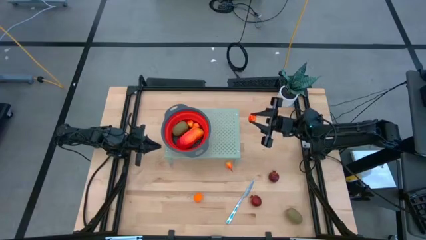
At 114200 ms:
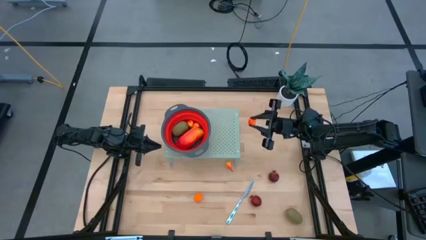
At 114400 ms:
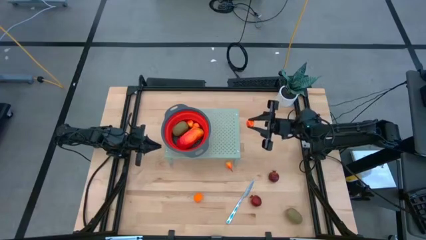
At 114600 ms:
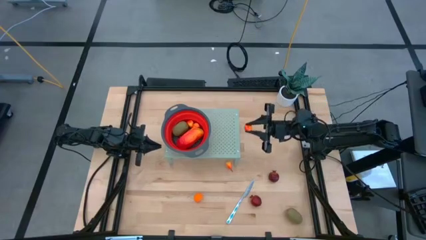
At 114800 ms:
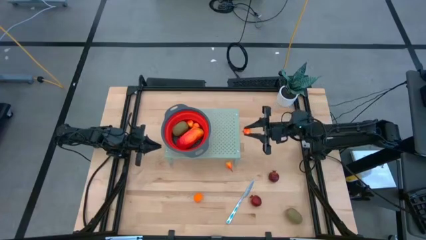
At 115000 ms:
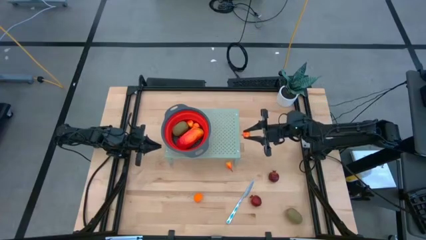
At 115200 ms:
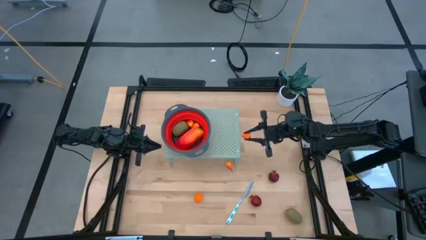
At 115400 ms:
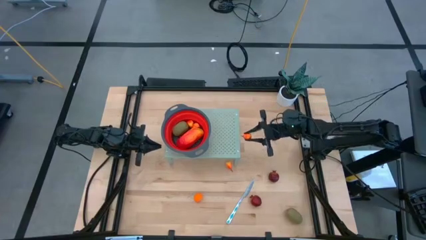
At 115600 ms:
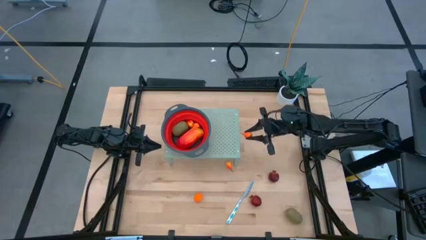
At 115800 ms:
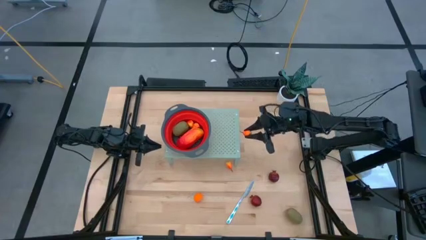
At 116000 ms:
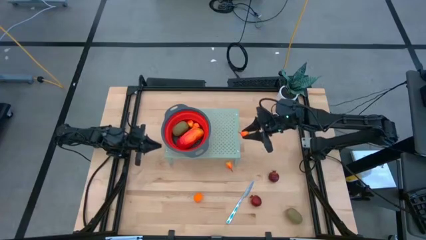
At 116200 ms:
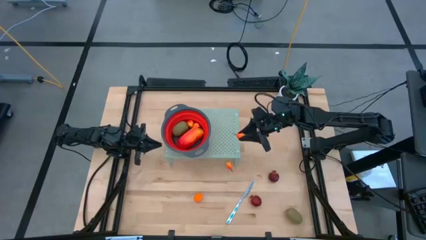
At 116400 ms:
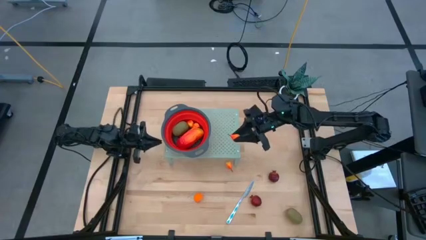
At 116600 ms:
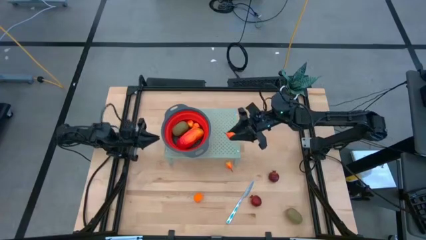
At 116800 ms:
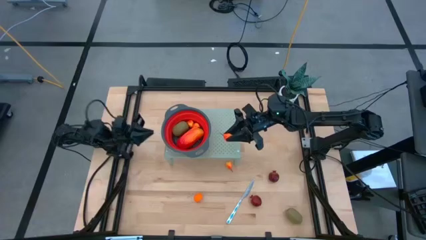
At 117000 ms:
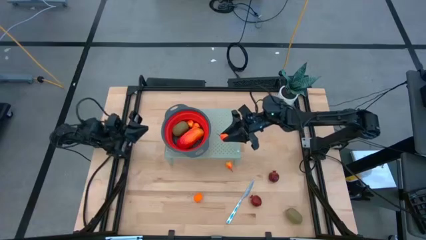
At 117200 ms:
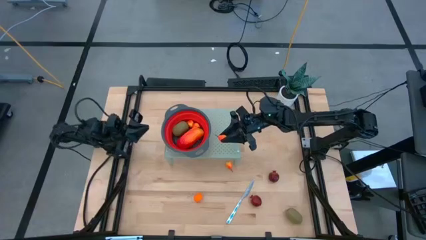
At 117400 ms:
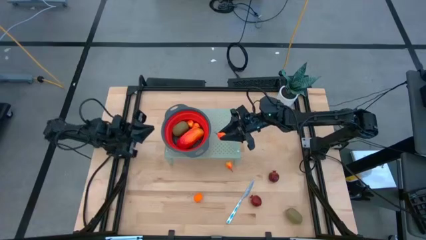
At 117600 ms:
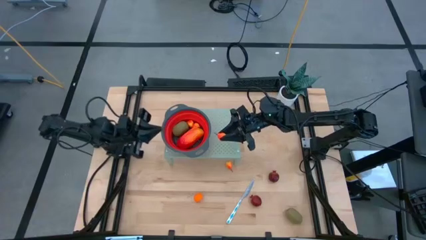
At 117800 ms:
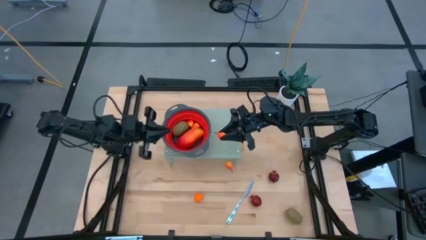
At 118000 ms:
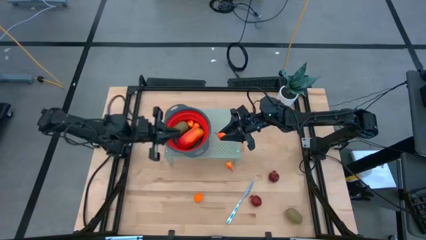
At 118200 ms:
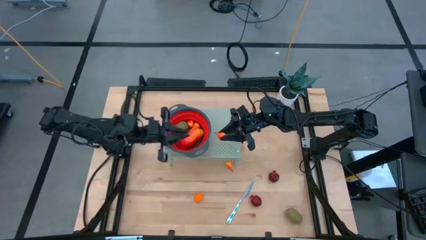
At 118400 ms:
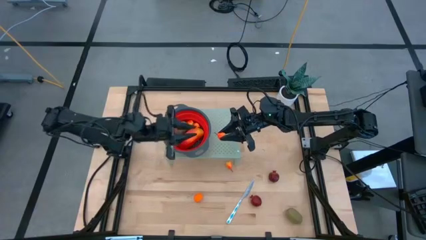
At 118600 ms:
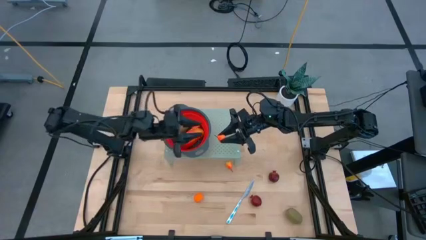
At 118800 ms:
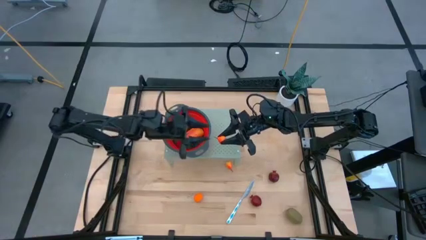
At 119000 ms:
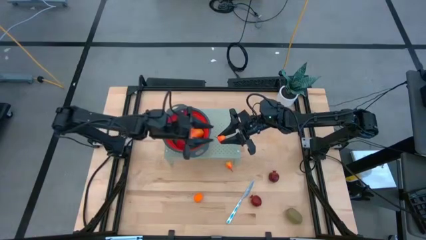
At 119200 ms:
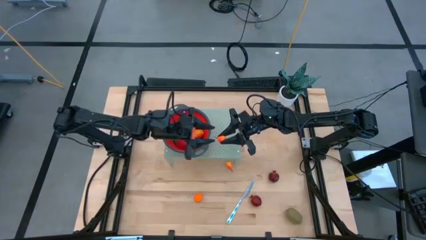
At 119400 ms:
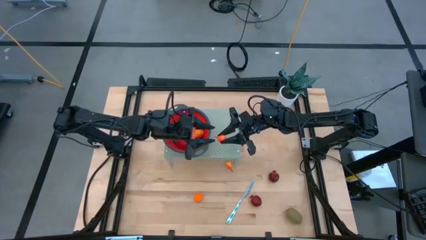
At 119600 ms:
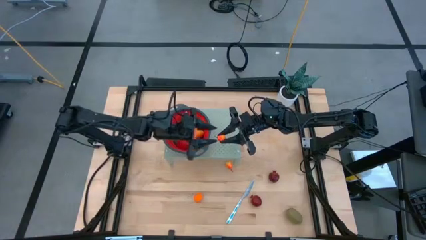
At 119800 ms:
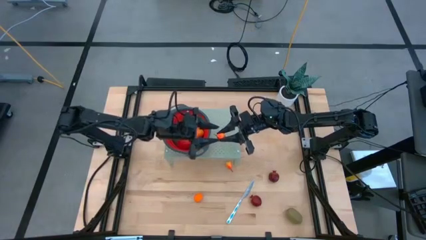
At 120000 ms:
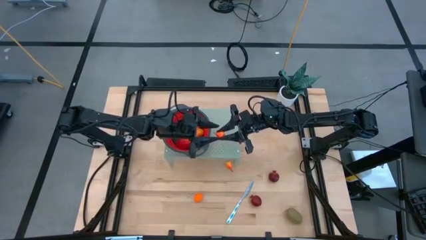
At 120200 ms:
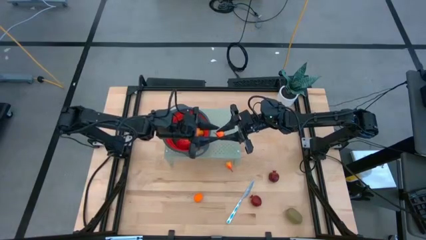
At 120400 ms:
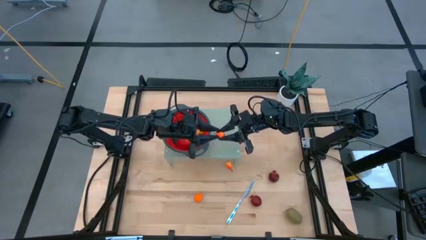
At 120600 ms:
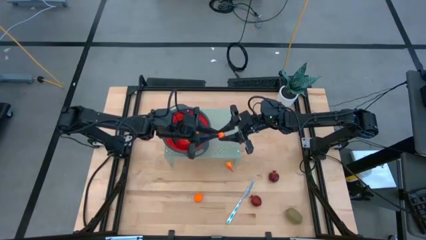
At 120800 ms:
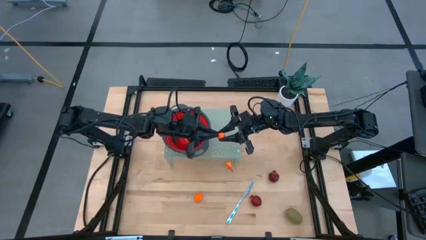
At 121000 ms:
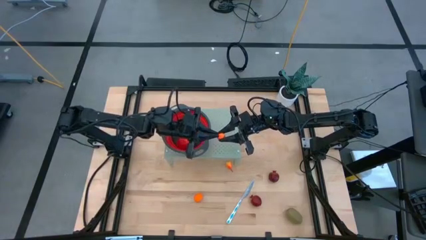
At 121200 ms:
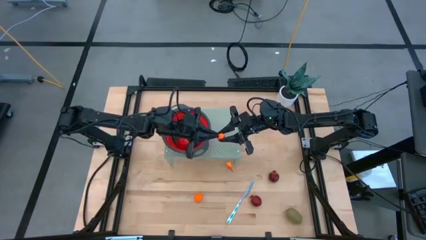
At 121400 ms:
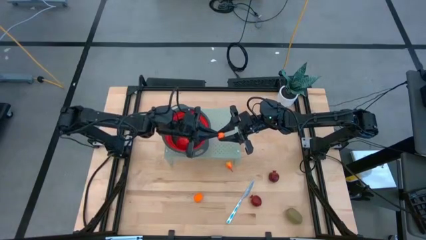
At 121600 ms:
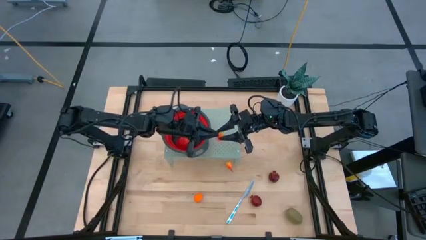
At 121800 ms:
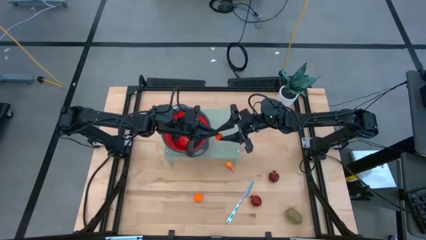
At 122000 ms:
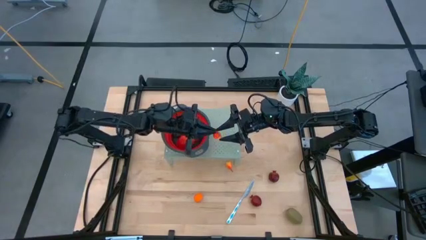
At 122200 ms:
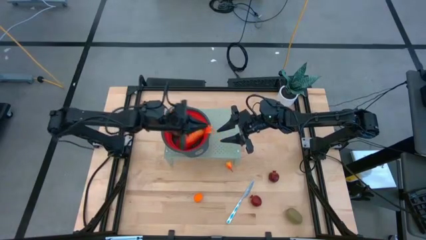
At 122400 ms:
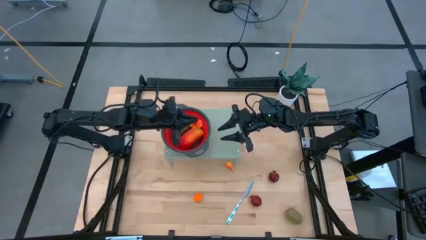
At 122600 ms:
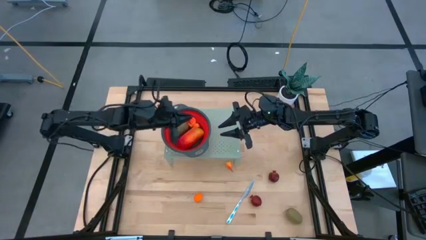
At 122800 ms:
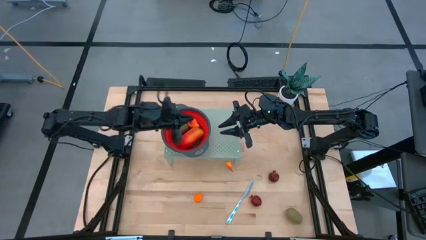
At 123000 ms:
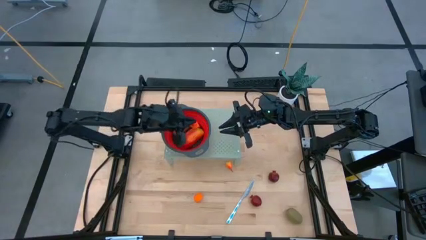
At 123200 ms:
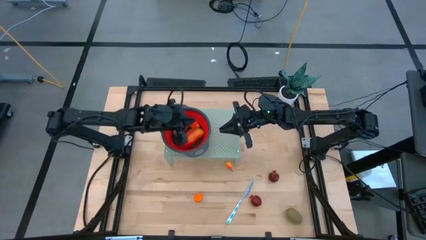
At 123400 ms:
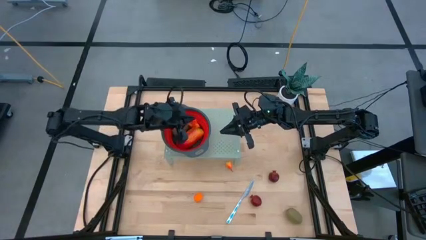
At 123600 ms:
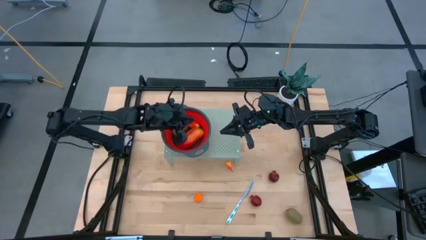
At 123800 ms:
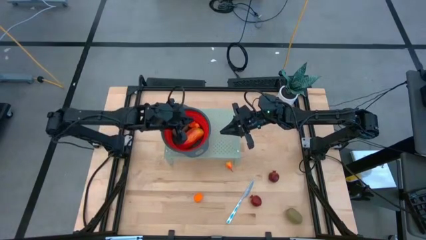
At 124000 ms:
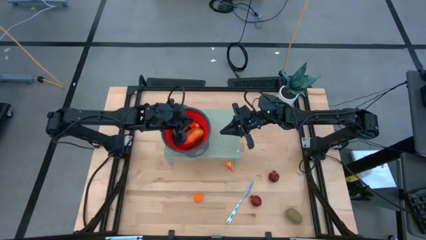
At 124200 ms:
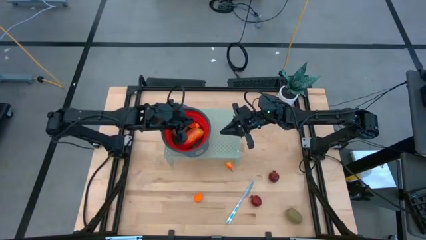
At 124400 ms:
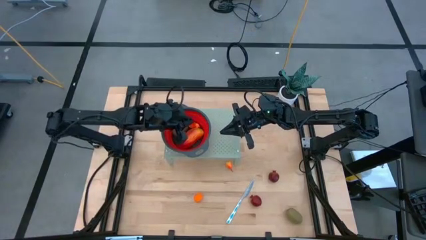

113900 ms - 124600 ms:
Task: Pick & Place Fruit
Put the orange pear into the red strainer bowl on the shelf

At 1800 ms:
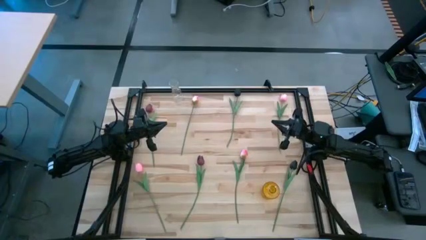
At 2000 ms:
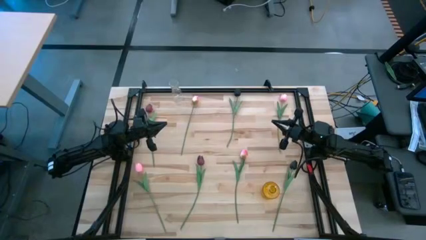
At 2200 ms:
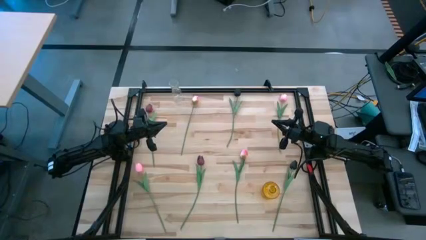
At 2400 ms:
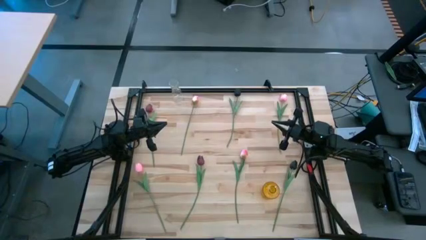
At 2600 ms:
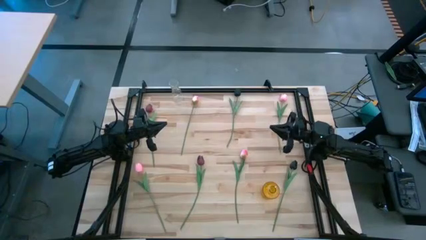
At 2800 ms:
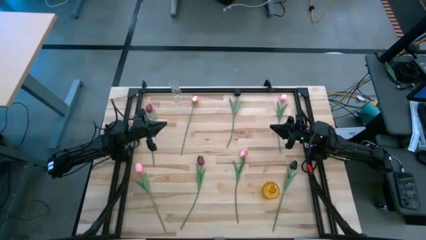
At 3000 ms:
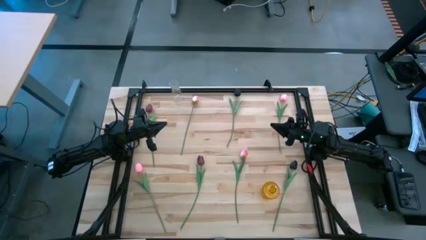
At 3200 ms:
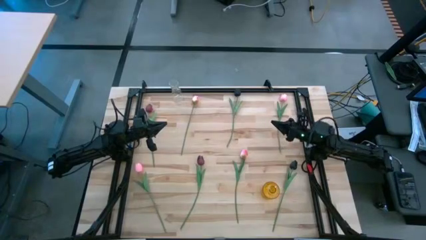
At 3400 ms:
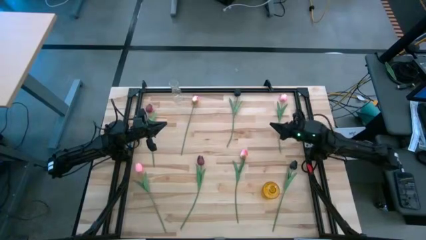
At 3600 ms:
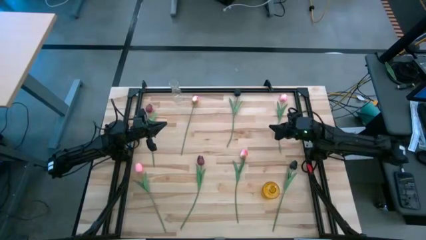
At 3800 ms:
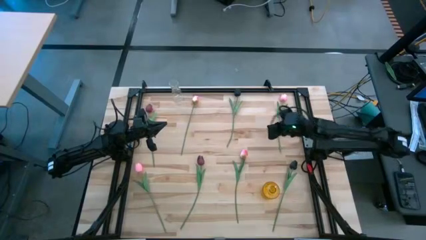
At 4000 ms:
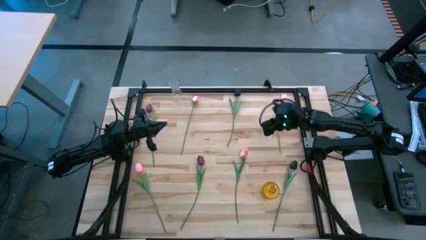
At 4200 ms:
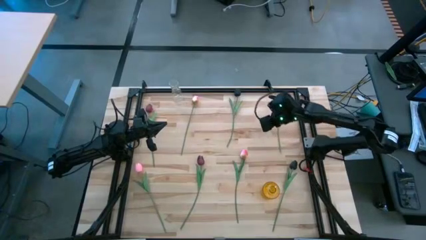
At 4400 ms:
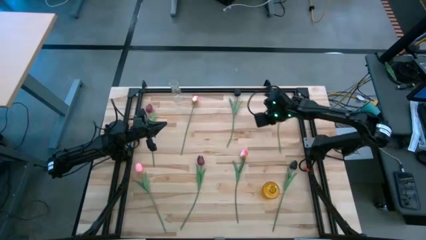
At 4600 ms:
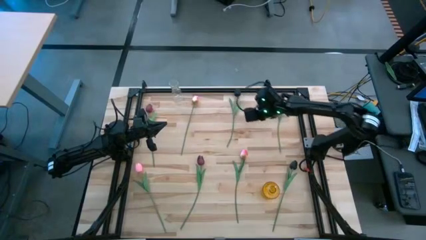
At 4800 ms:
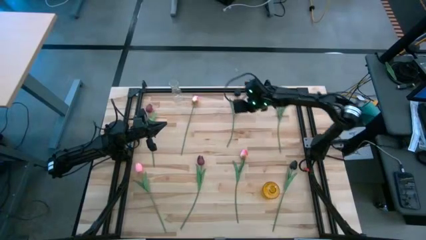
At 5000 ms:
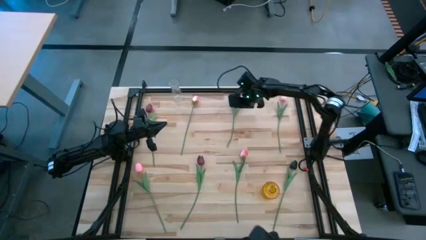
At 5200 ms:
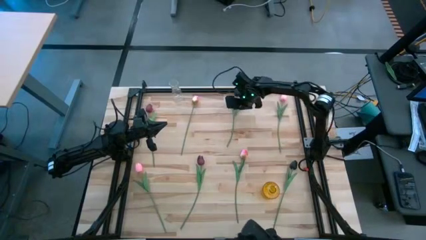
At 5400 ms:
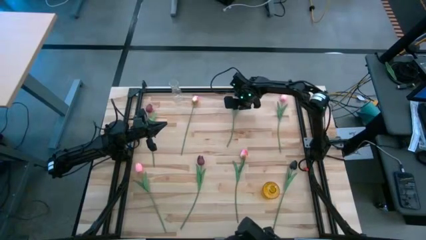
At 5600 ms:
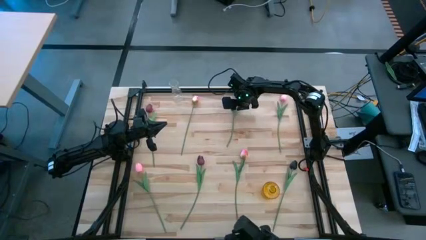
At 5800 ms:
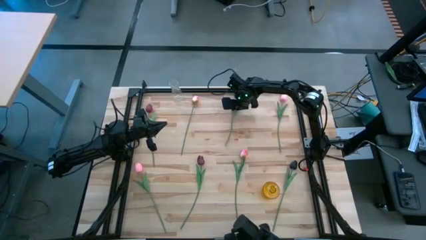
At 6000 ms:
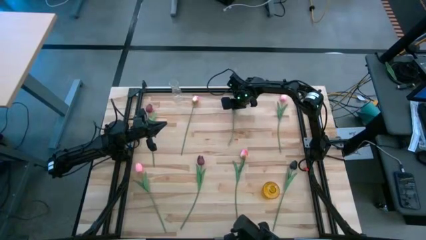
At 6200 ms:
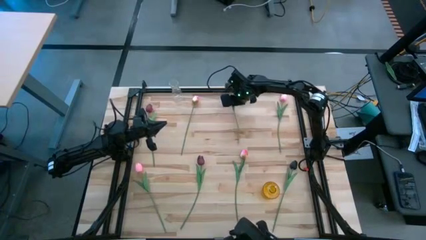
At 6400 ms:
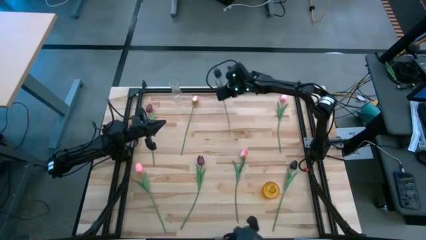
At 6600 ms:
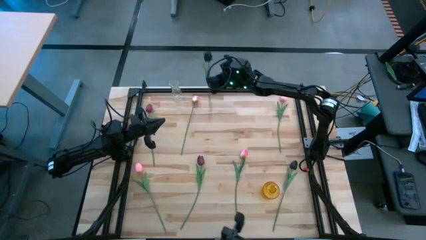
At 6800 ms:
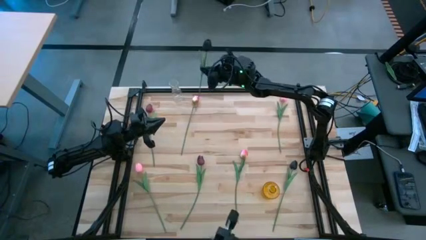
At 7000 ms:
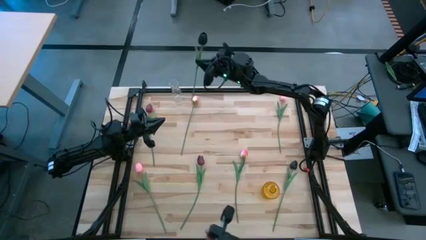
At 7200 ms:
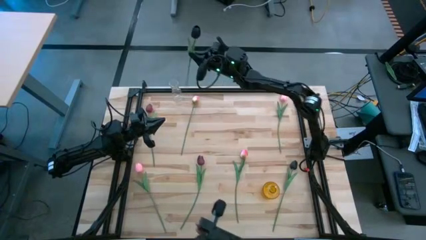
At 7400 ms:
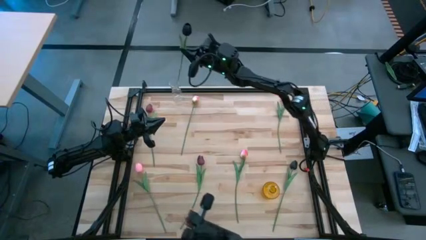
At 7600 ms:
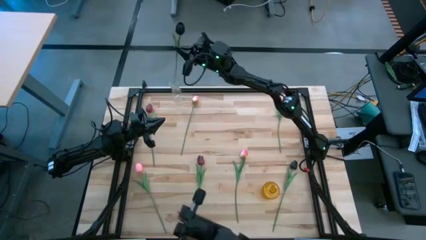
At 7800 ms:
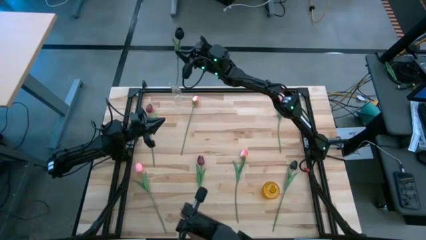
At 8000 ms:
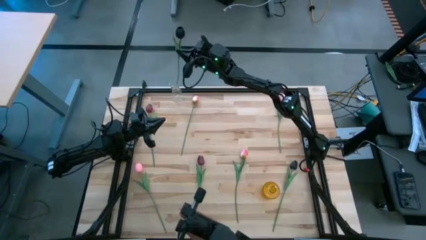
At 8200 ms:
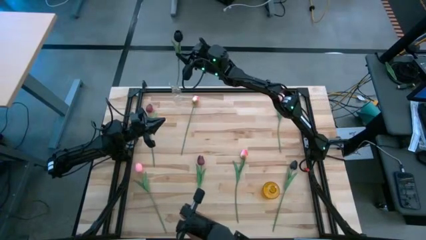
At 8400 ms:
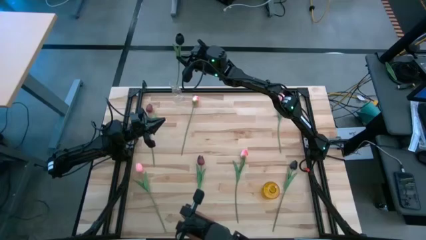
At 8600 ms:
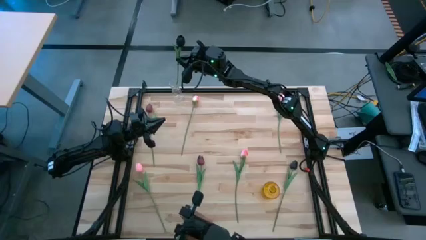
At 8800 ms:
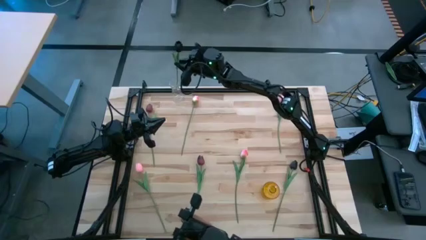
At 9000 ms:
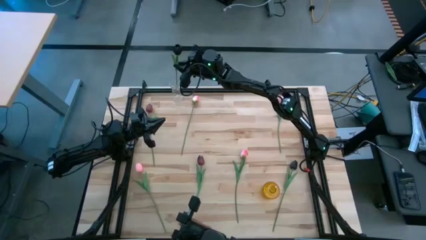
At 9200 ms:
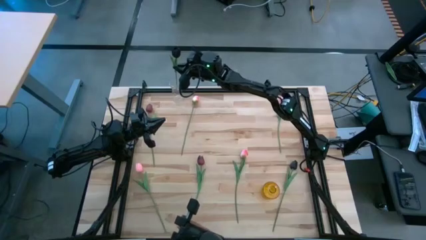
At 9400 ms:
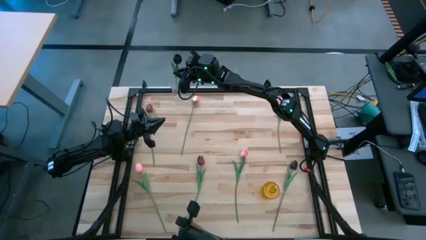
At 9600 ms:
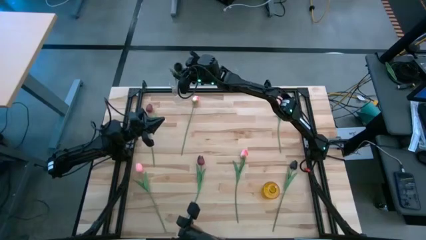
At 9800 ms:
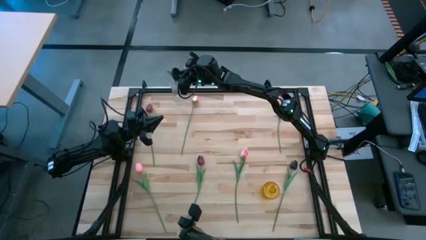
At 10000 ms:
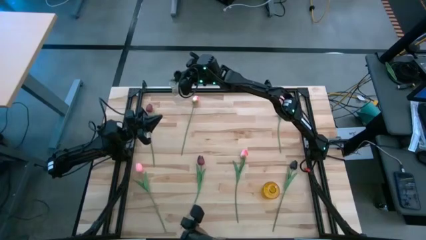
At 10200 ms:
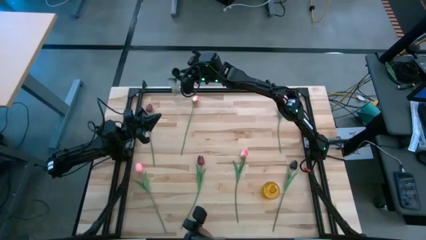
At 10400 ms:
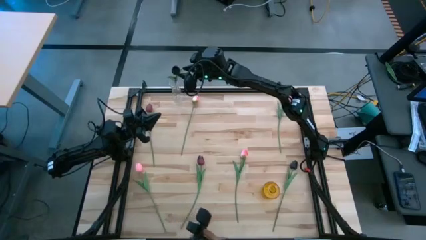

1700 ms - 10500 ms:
Task: Sort flowers into vase by color
Put the top black flower into the transparent flower vase
